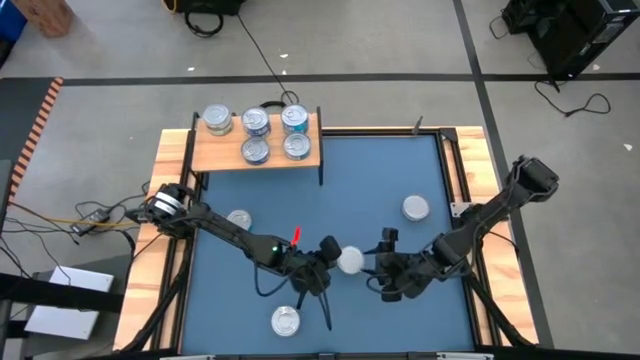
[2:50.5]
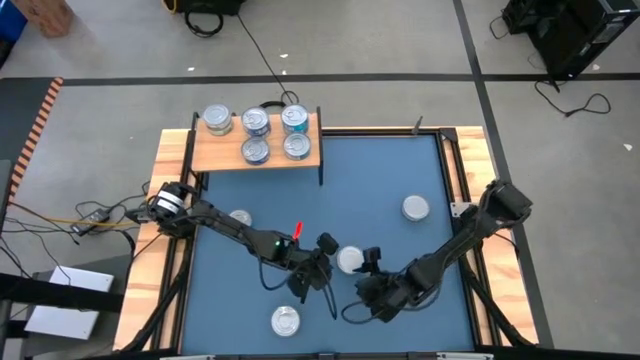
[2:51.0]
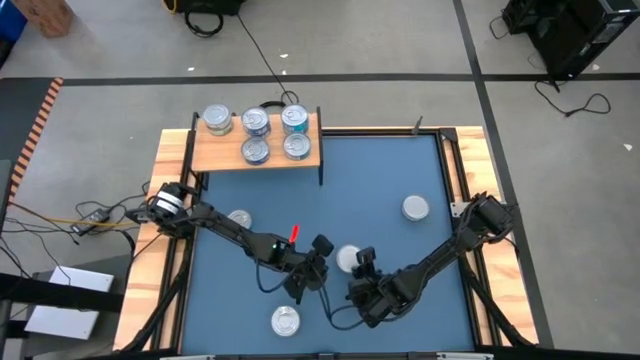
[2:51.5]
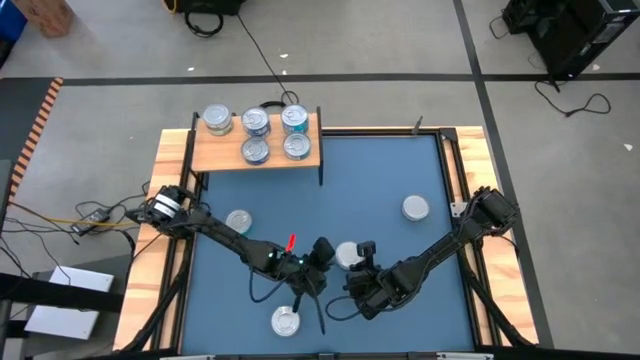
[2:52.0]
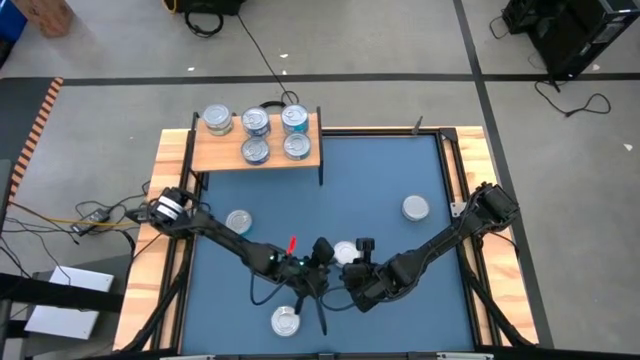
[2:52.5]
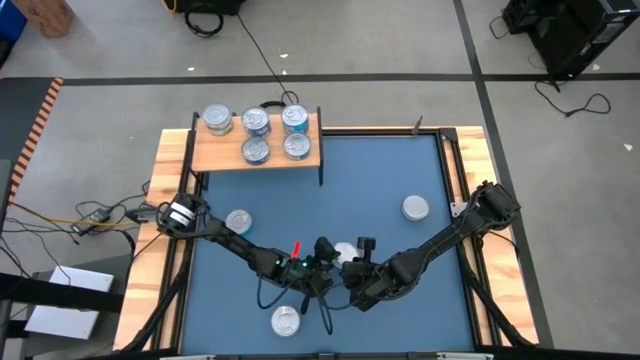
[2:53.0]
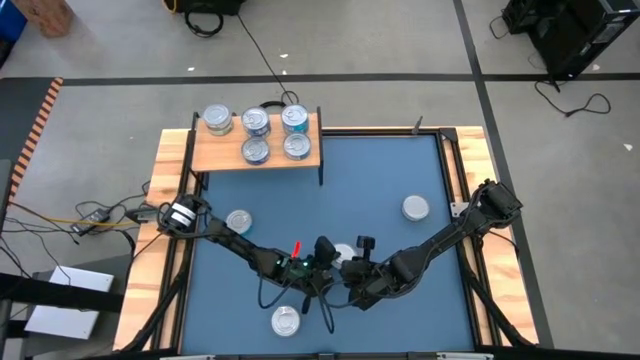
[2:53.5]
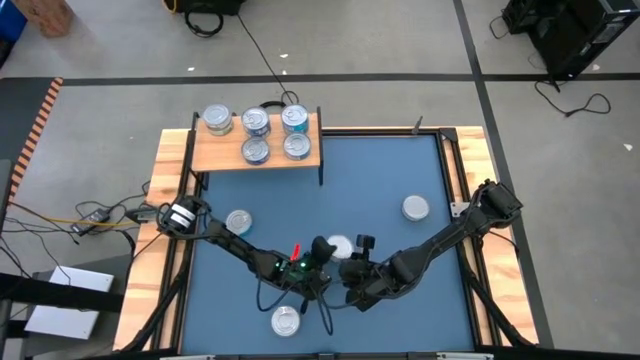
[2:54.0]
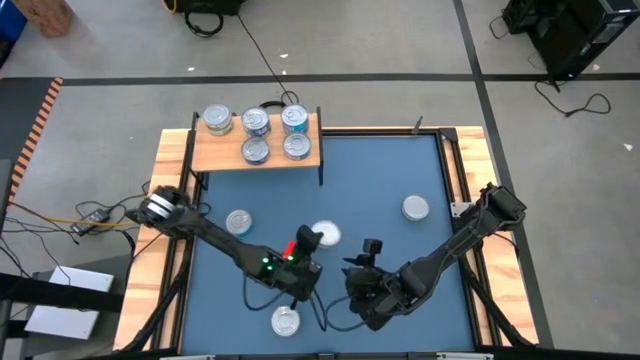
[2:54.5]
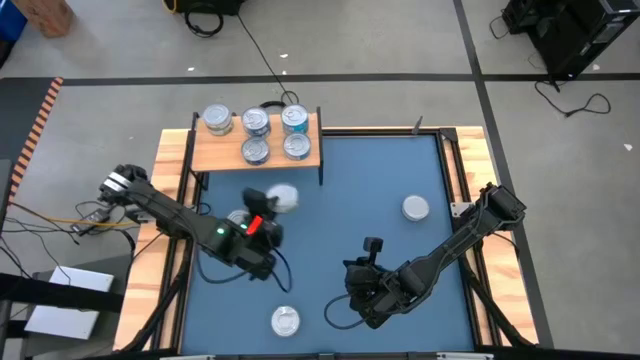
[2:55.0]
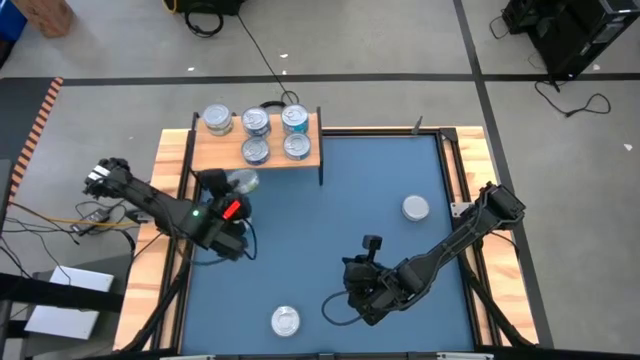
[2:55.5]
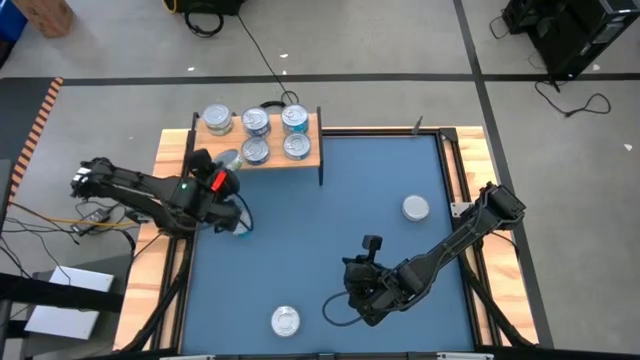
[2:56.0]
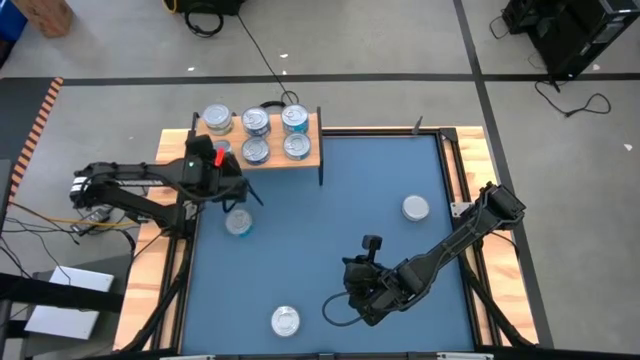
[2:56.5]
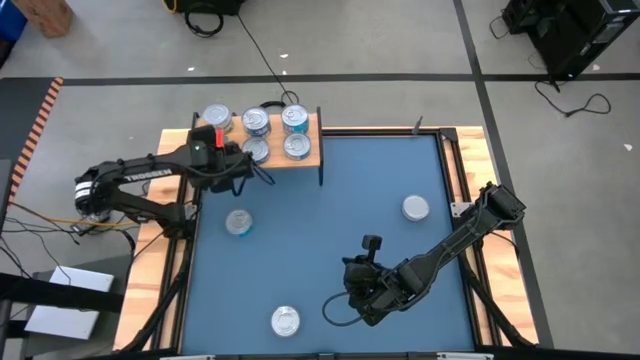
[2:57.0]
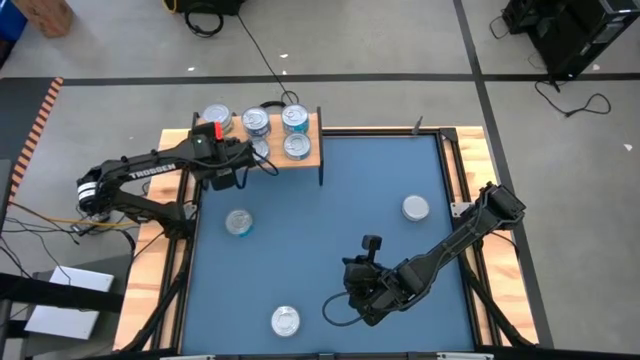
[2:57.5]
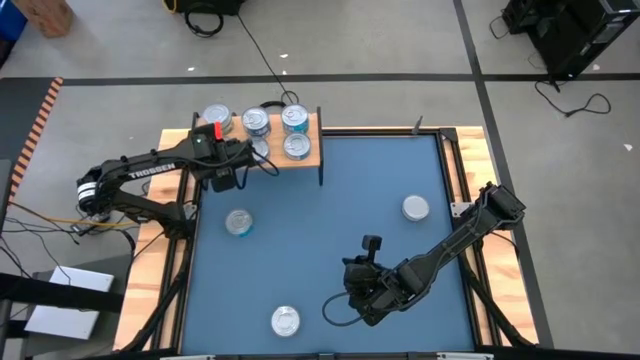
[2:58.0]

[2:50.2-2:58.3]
Task: Stack canned seafood by type on shelf
Put the green white tuna can on the shelf aligned with the other green white tuna cans

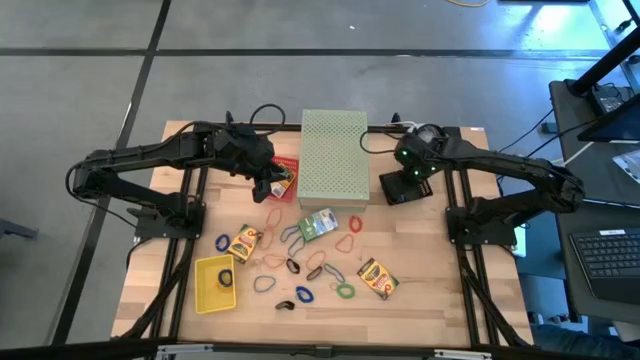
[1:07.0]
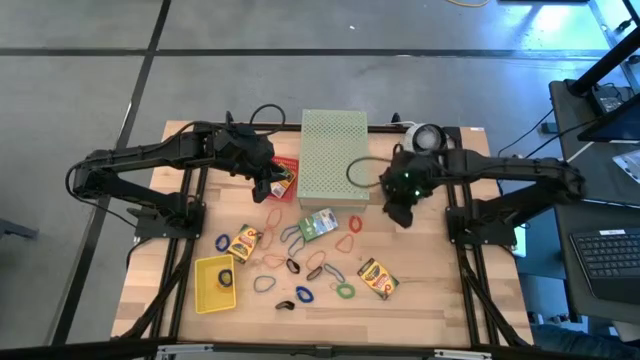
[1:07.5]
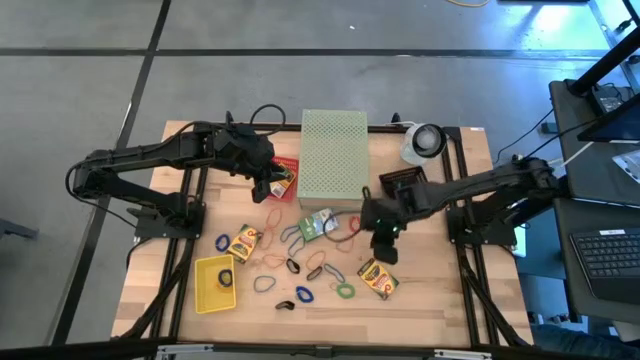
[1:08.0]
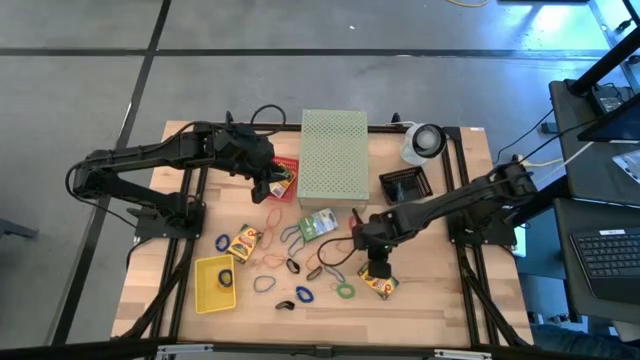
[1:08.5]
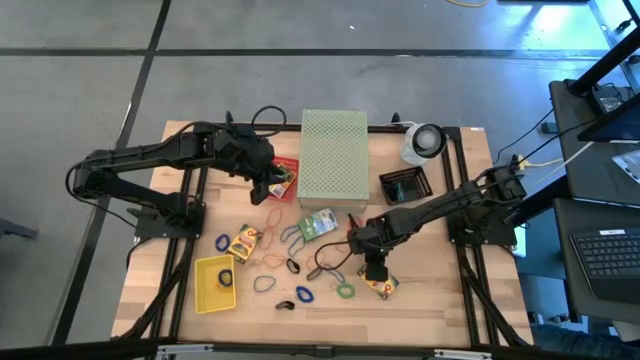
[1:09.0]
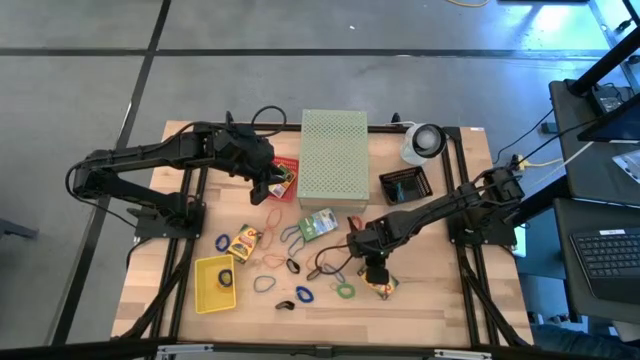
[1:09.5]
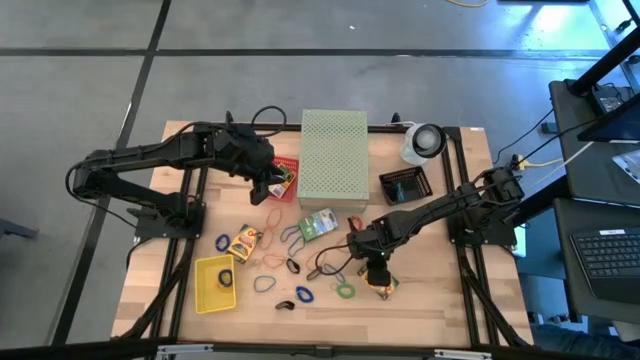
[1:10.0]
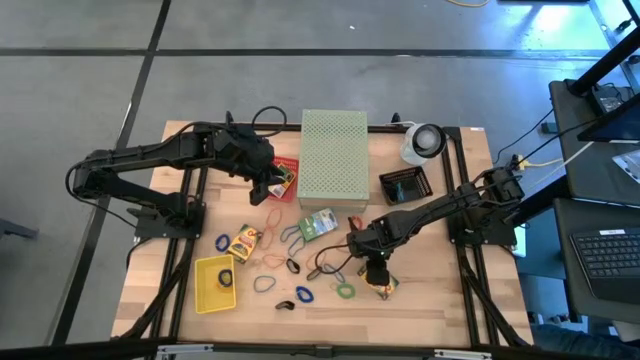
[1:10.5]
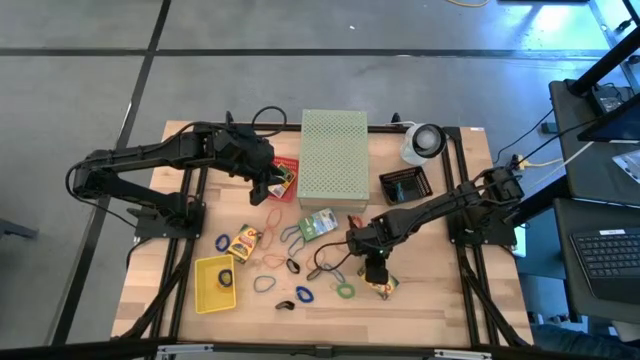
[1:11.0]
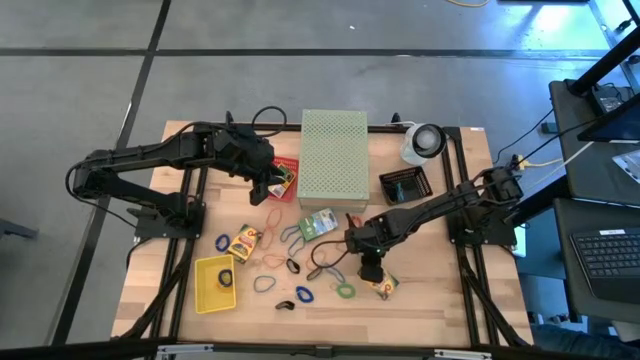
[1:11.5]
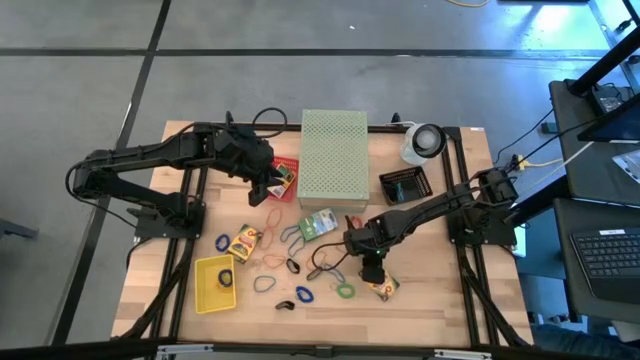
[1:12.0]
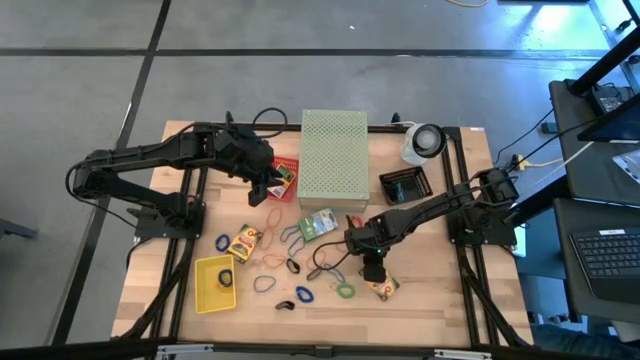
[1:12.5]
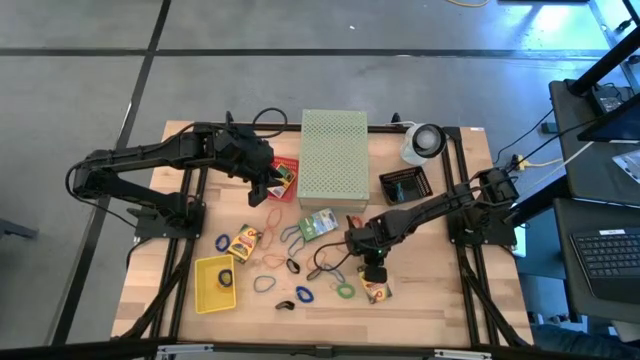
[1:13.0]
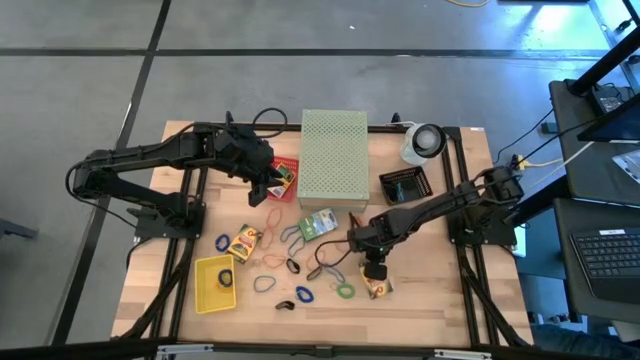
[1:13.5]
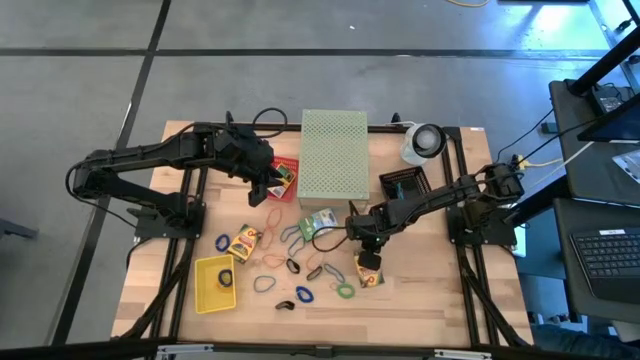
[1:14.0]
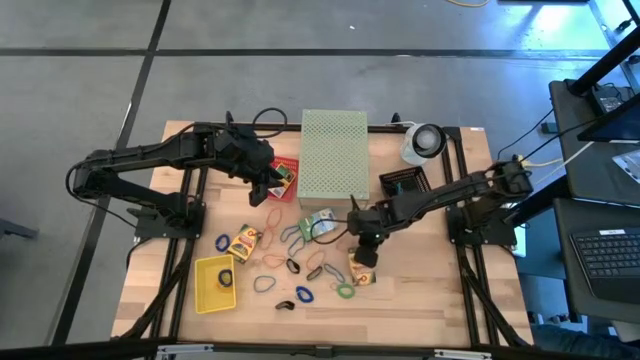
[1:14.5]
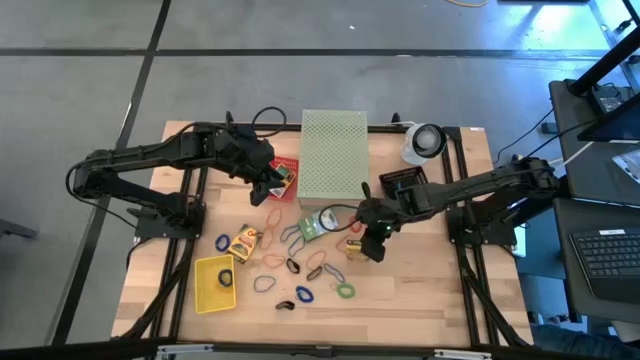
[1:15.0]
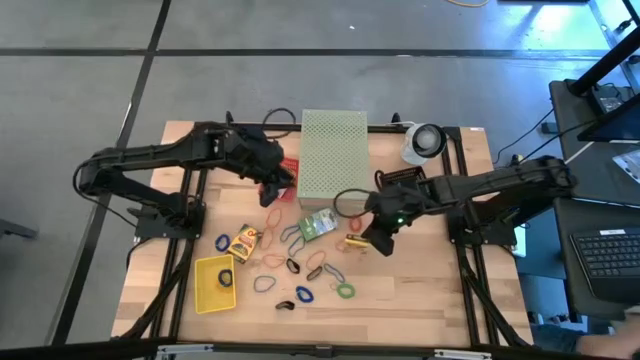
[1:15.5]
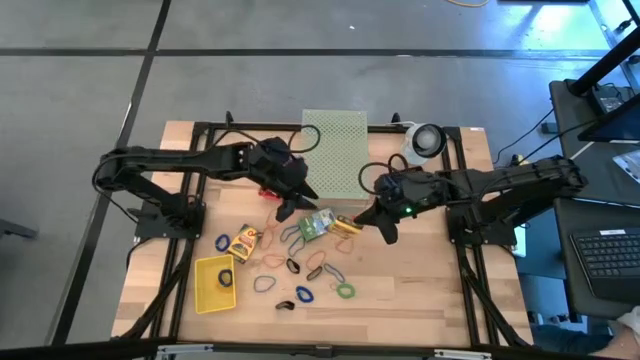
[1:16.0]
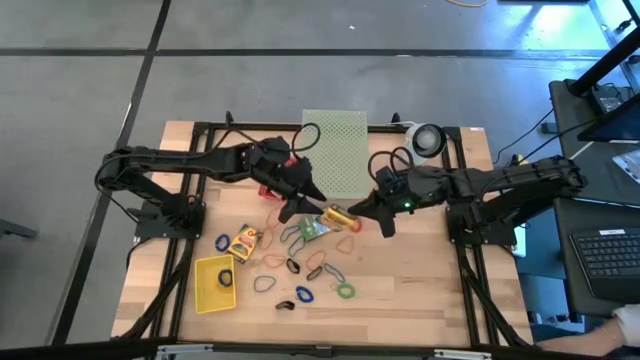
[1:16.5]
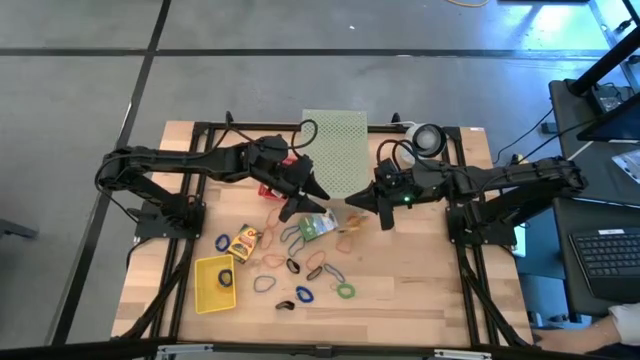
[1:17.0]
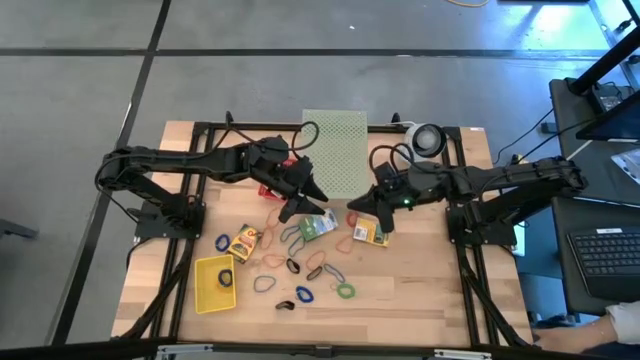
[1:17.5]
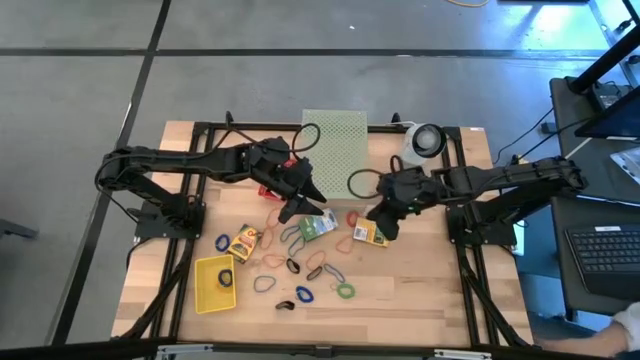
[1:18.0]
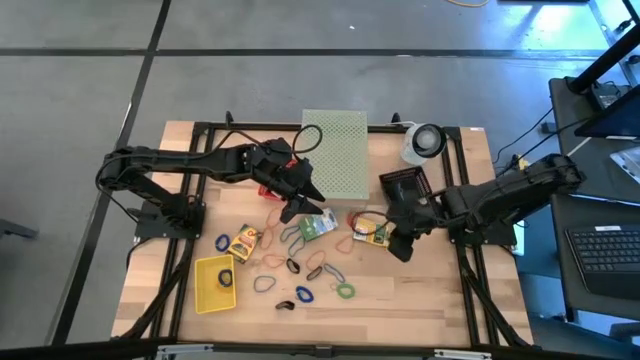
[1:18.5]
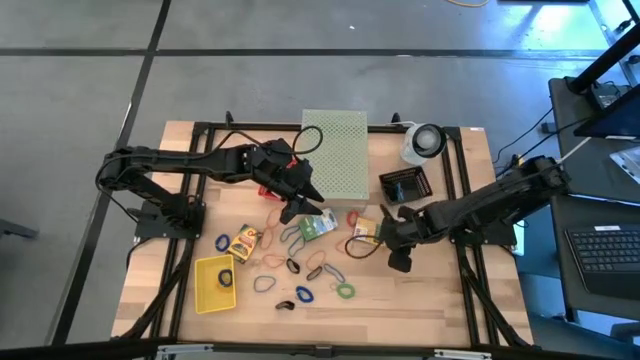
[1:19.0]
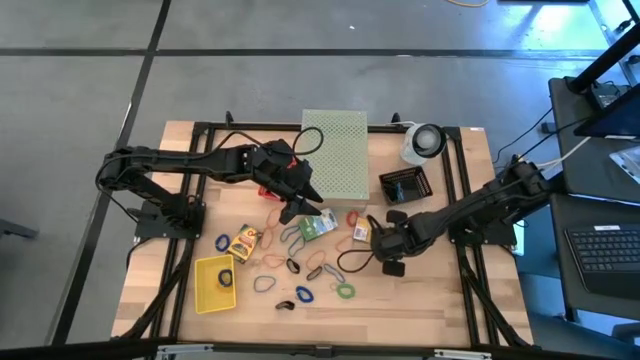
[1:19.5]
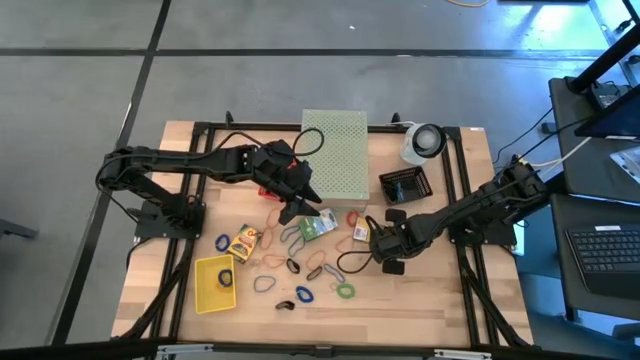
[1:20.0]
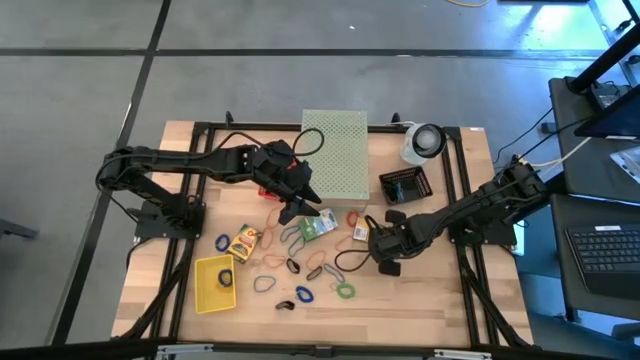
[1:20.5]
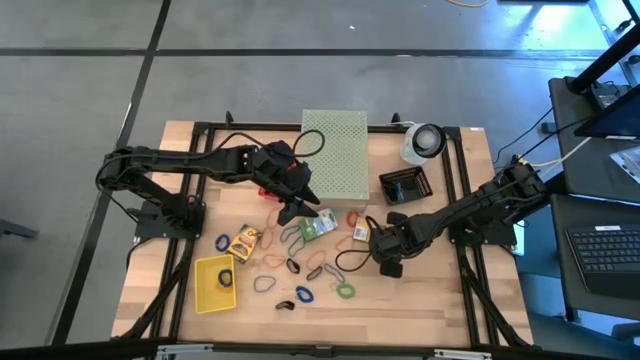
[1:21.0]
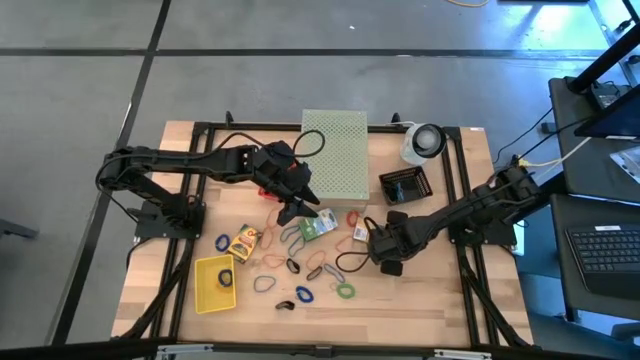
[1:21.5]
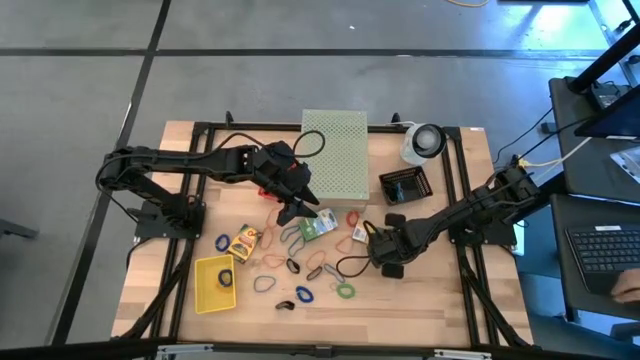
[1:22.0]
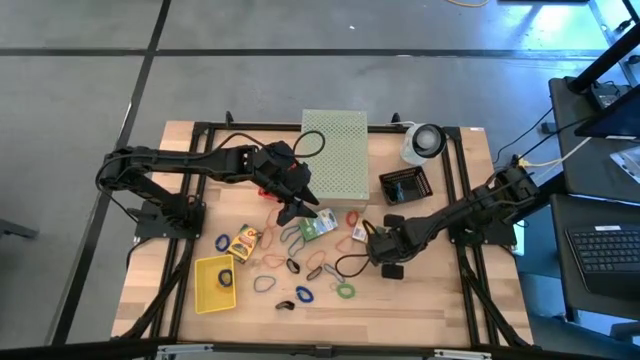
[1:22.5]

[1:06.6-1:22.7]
Task: Pick & Place Office Desk Supplies
Put the crayola box into the orange bin
